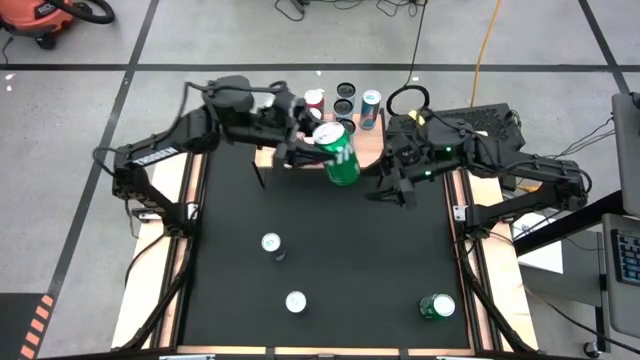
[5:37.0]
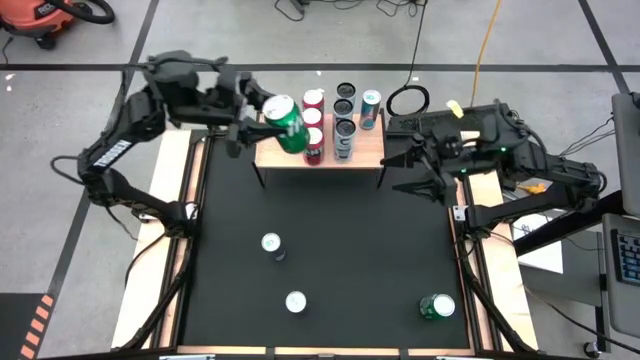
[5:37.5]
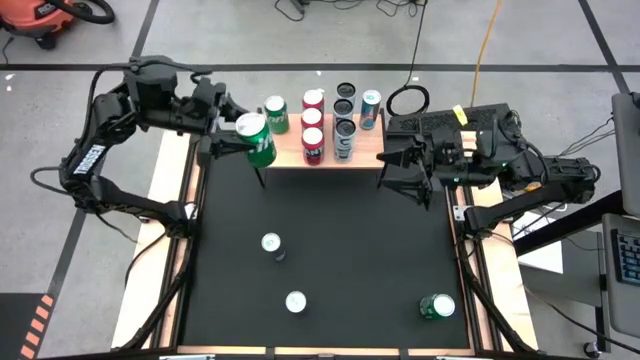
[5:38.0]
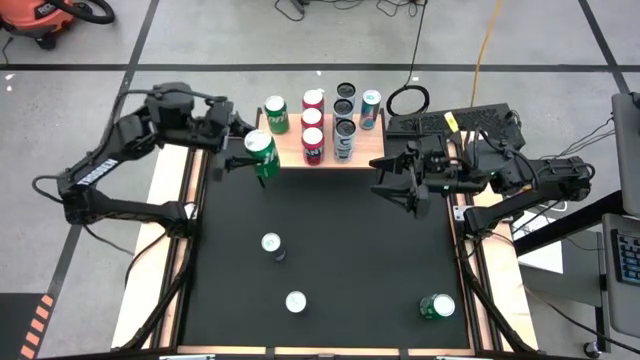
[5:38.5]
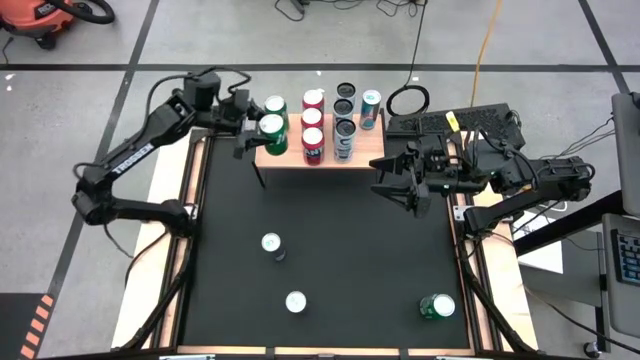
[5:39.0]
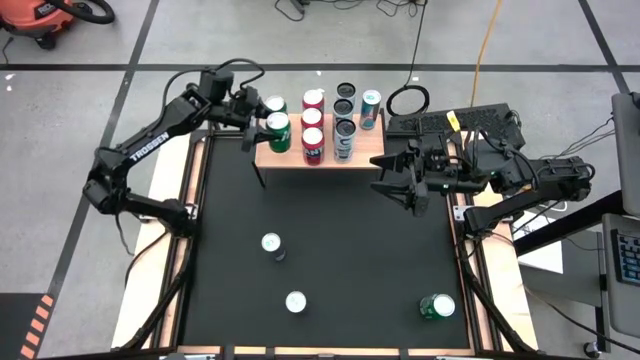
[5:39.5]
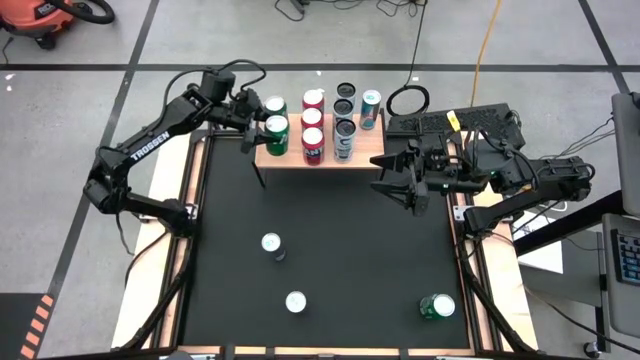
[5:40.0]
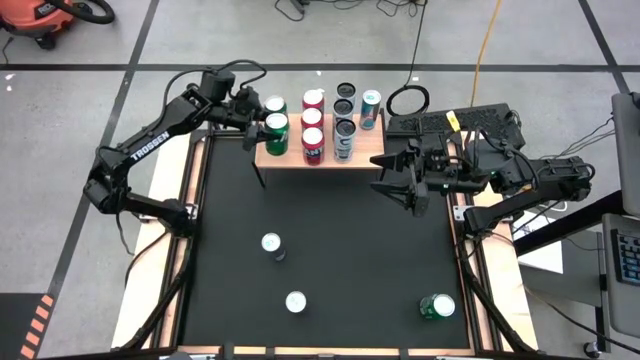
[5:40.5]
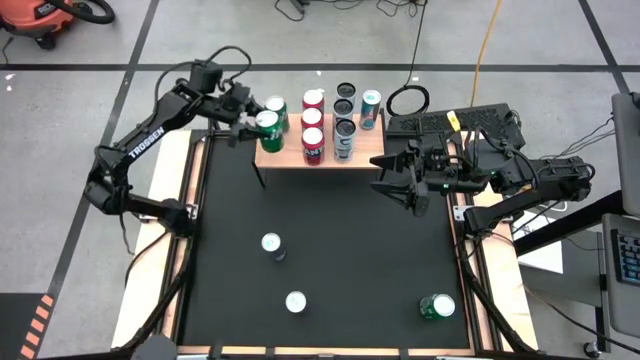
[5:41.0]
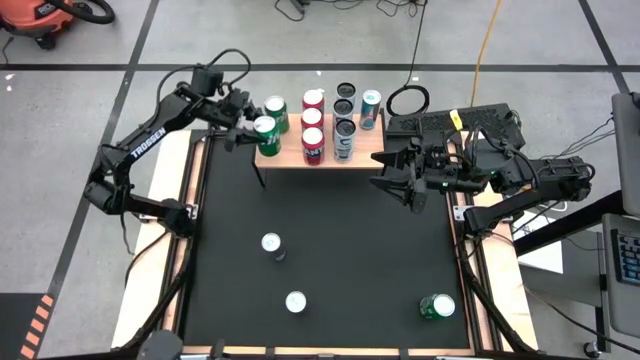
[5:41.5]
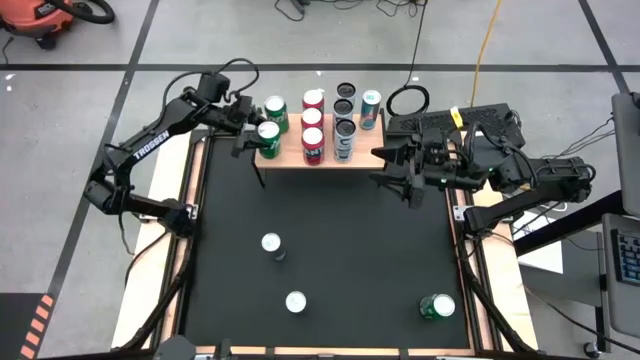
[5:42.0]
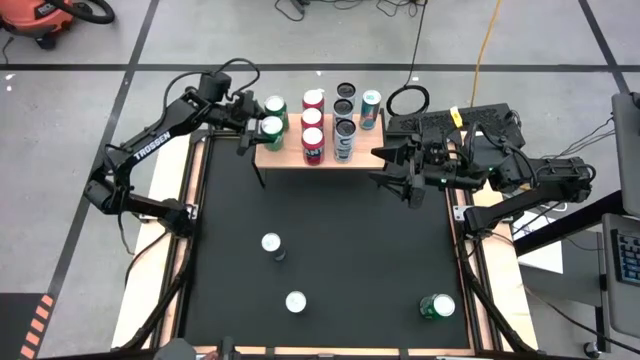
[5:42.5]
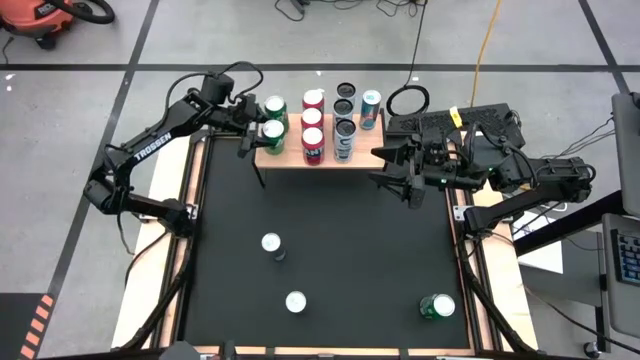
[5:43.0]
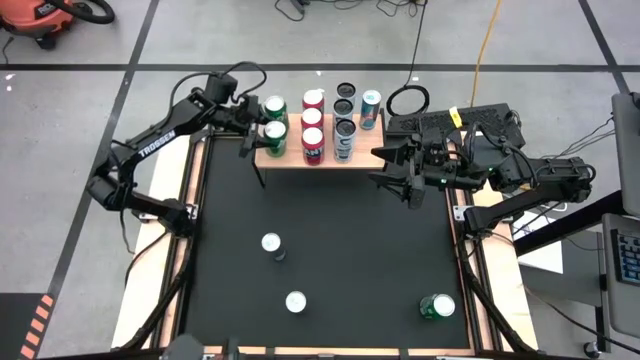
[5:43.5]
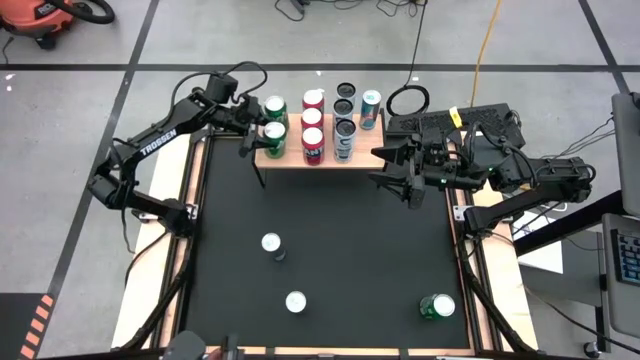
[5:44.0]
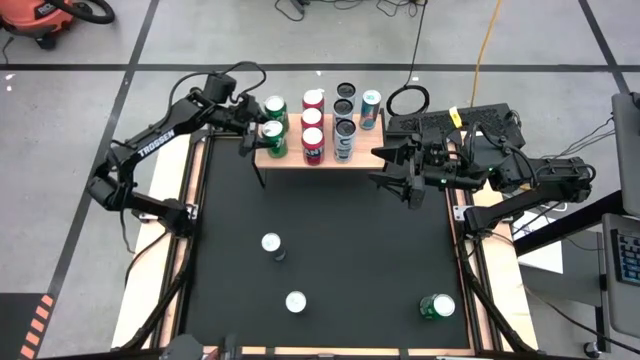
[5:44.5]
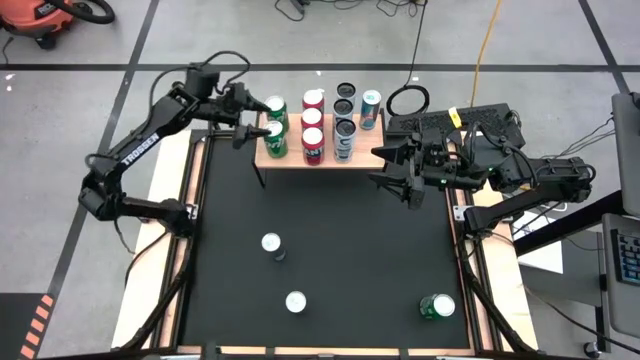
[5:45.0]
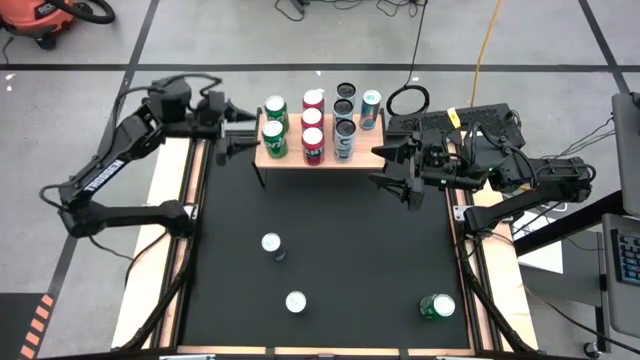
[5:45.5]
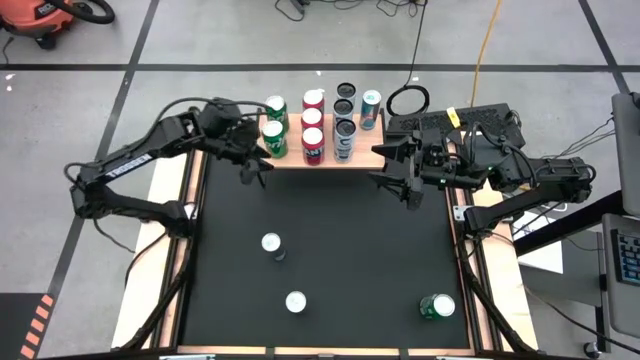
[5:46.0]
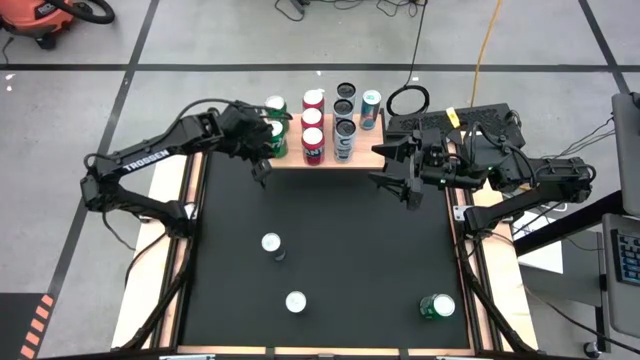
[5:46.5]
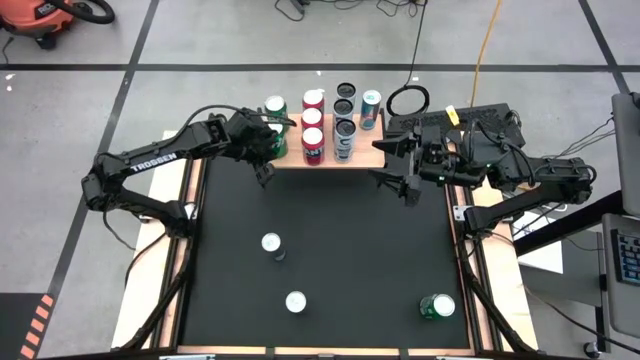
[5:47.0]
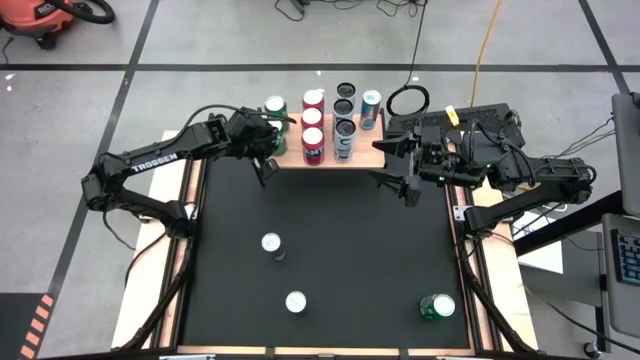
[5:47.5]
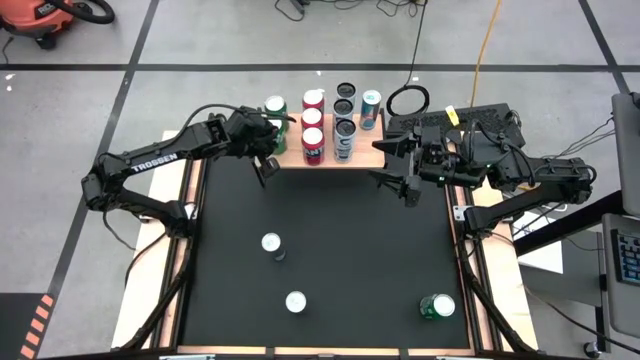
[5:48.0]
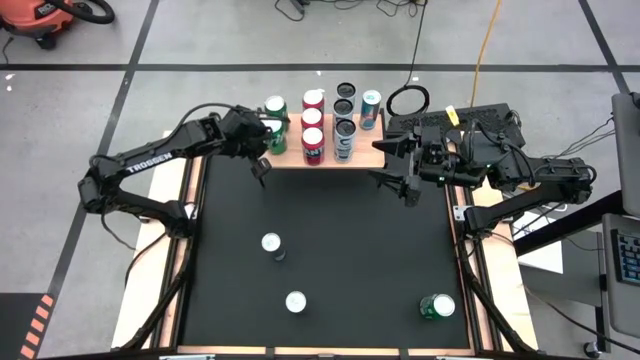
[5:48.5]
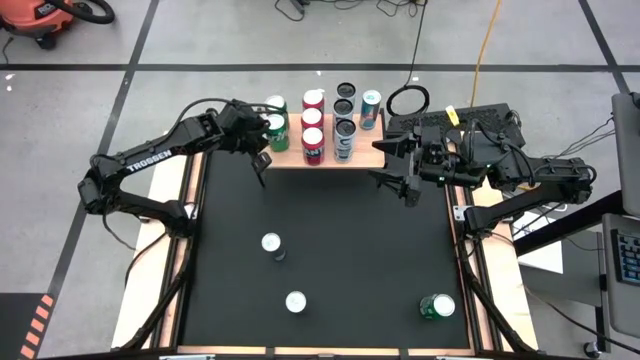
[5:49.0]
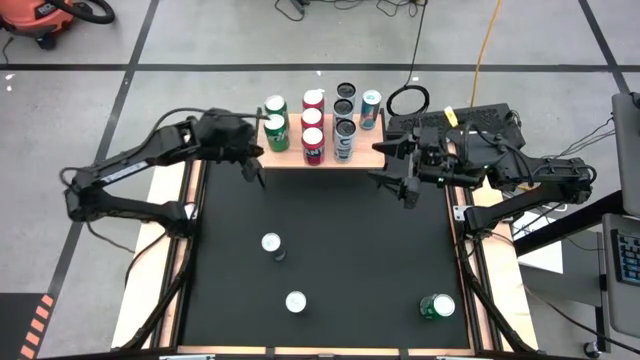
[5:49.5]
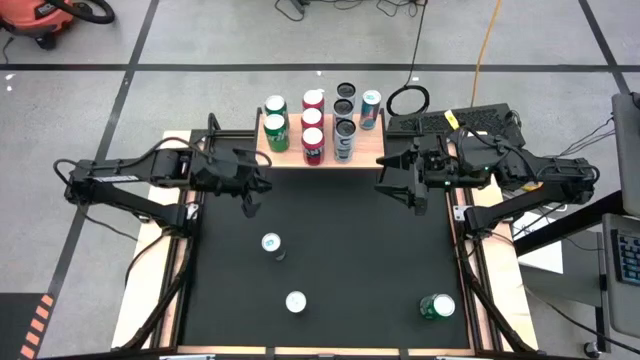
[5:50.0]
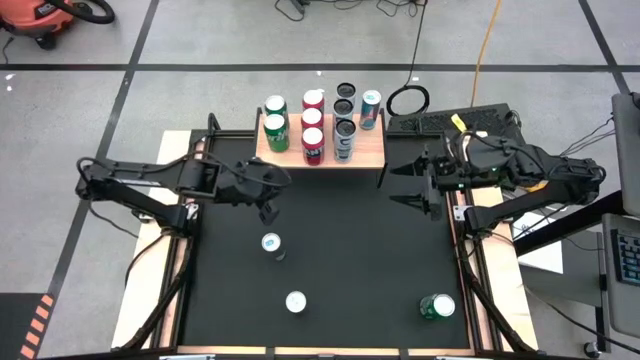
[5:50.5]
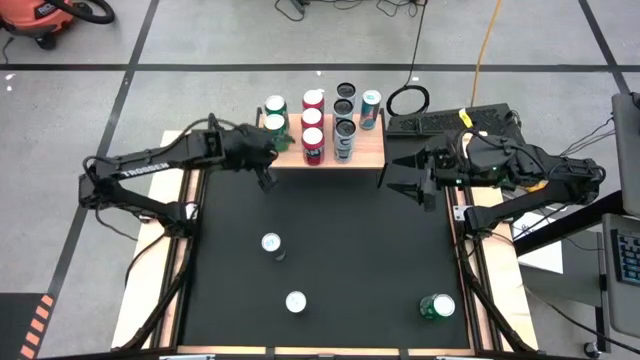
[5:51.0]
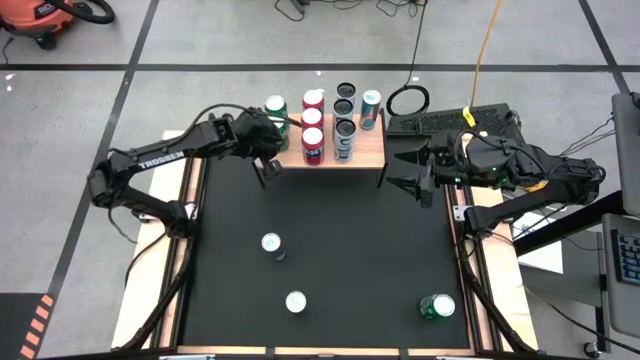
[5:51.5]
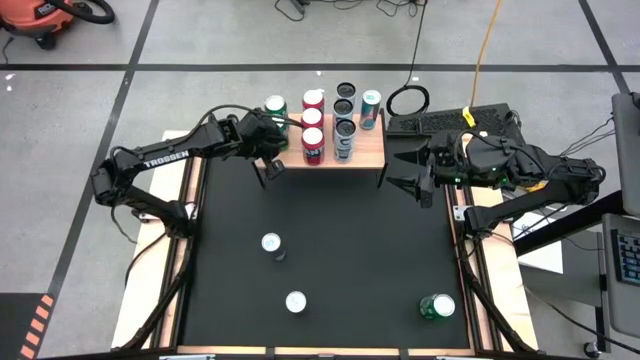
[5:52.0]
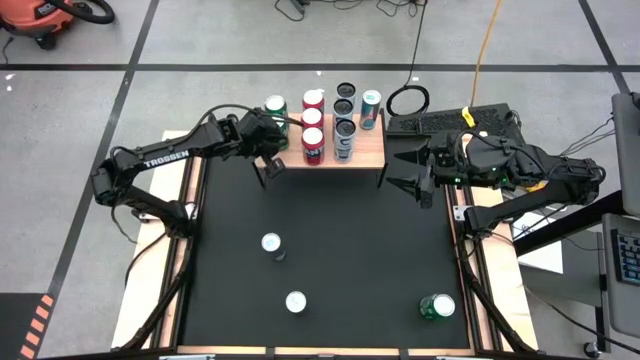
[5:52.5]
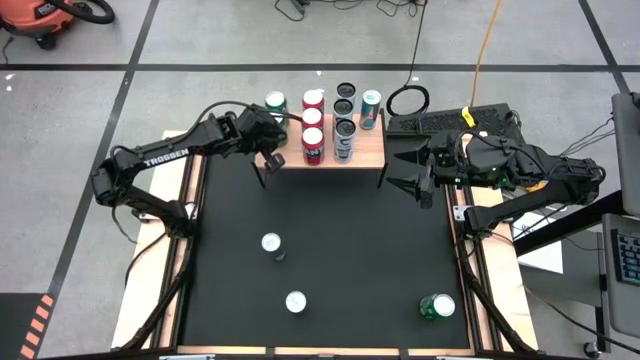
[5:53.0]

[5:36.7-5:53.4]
Task: Place canned beverage on shelf
Put the left green soda can on the shelf aligned with the other green soda can

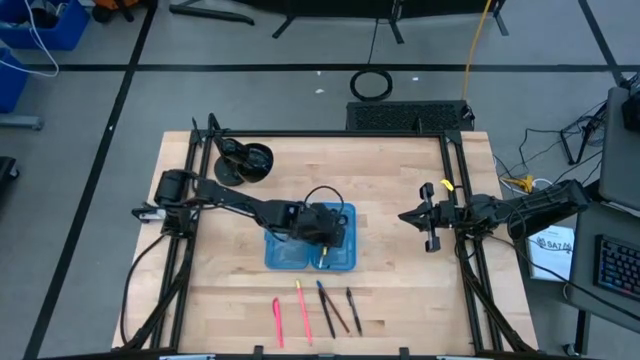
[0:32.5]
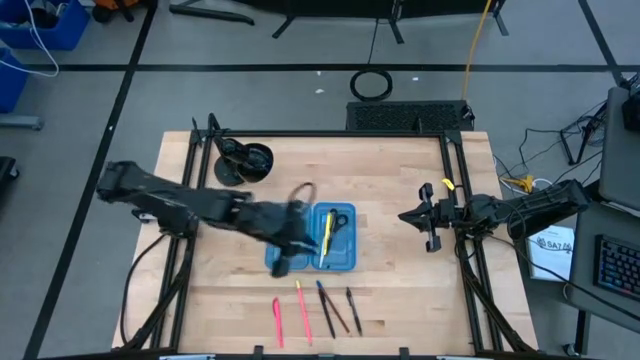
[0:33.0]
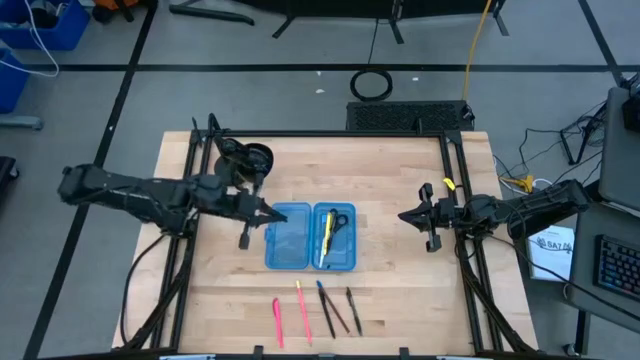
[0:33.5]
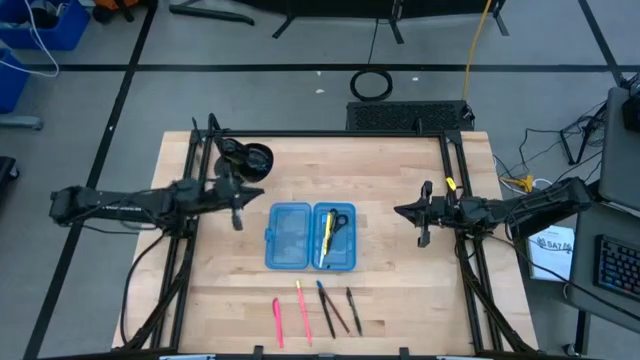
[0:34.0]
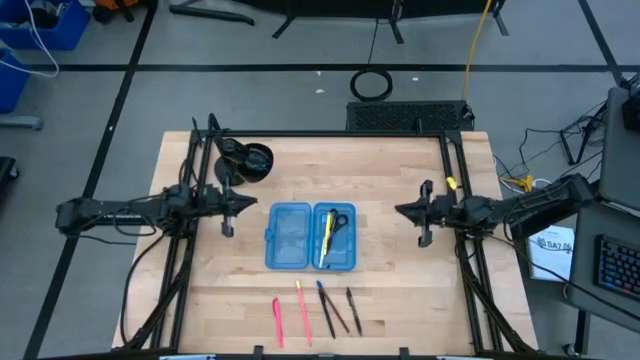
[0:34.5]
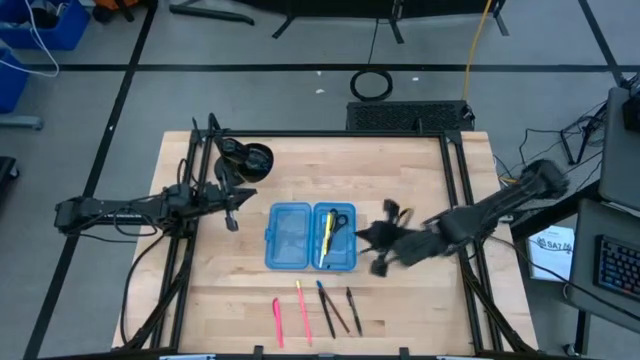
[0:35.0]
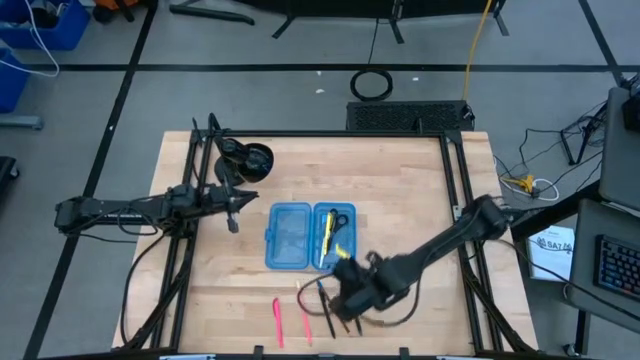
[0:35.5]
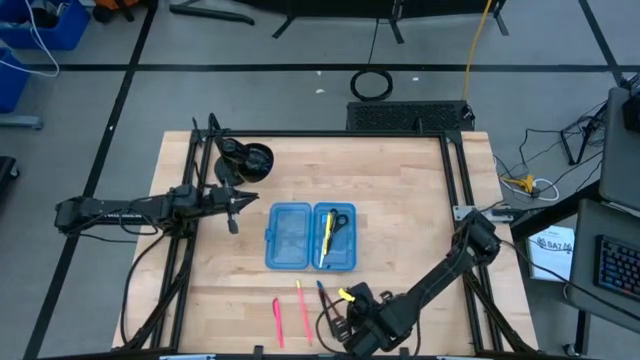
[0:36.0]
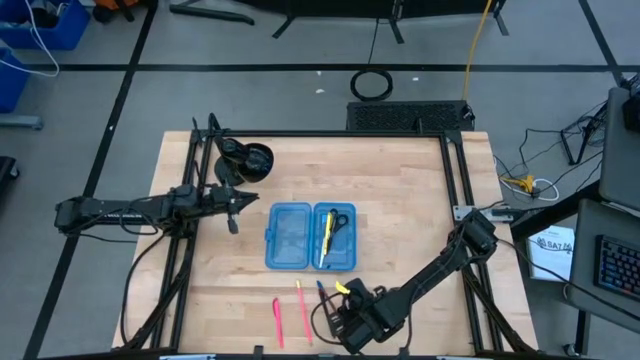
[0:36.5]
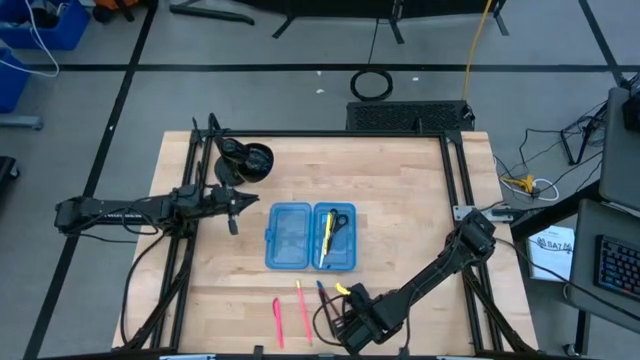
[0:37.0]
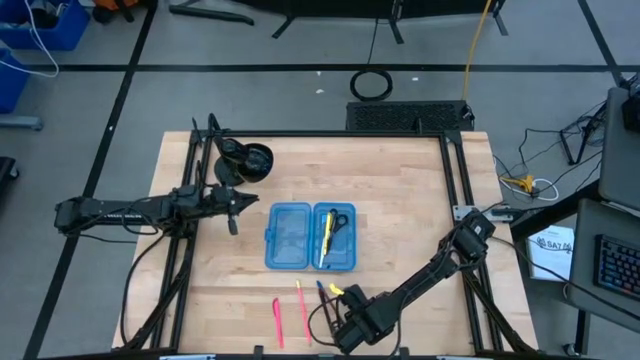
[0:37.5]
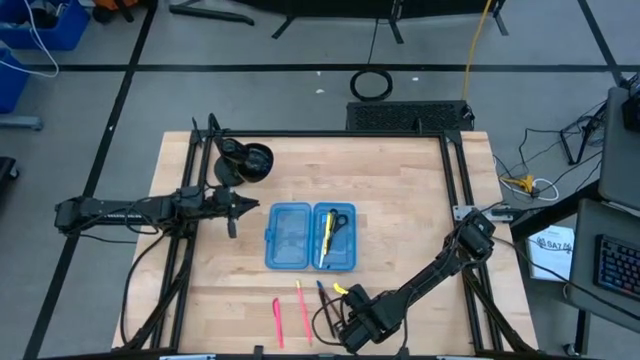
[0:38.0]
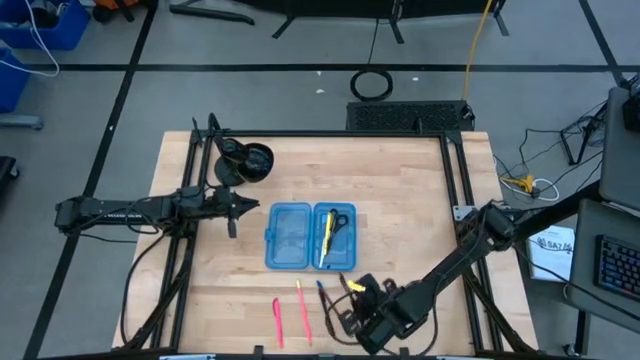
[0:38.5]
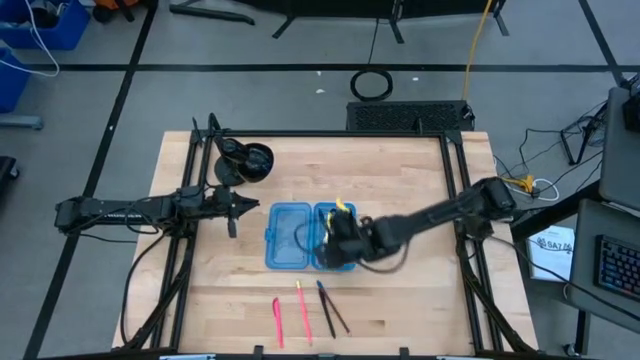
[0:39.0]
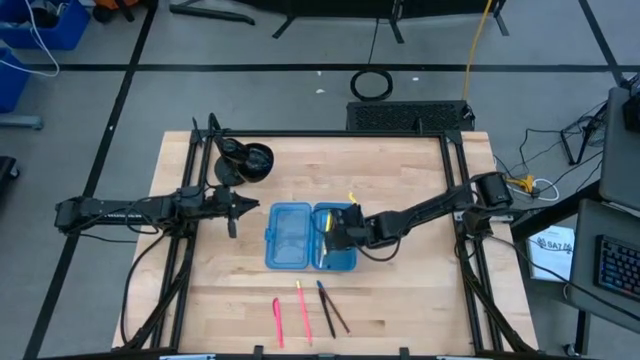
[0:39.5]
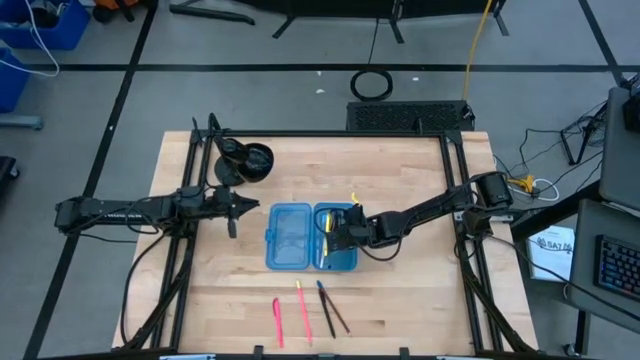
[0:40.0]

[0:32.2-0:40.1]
Task: Pick & place school supplies into a supply box
Put the black transparent pen into the blue supply box
